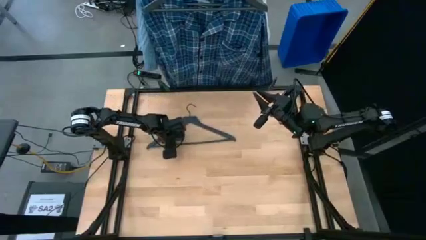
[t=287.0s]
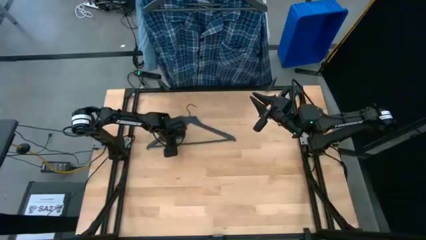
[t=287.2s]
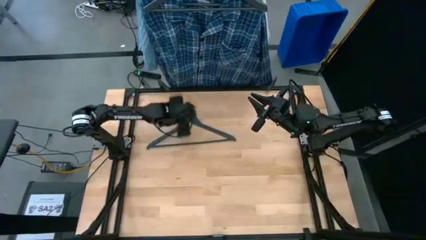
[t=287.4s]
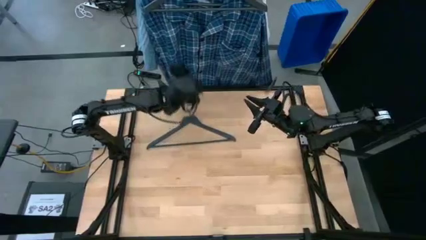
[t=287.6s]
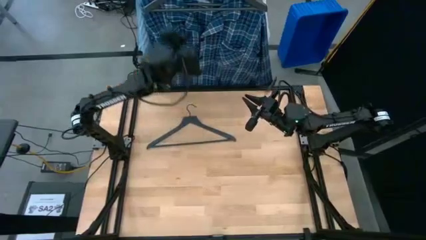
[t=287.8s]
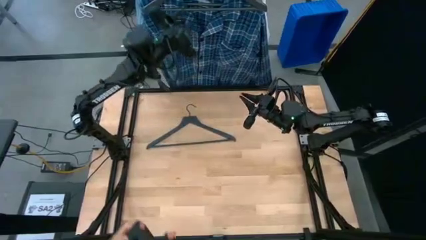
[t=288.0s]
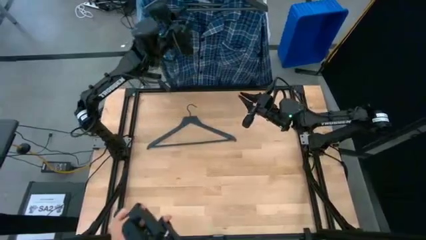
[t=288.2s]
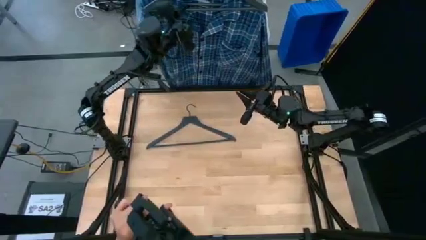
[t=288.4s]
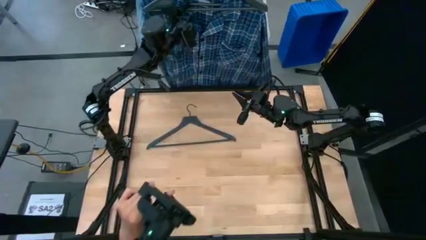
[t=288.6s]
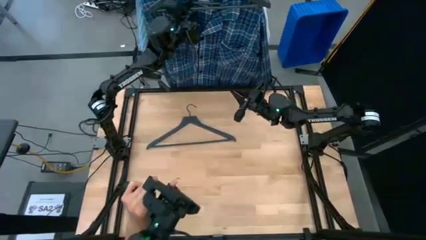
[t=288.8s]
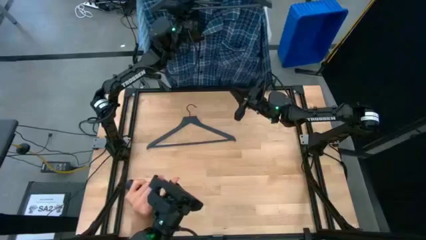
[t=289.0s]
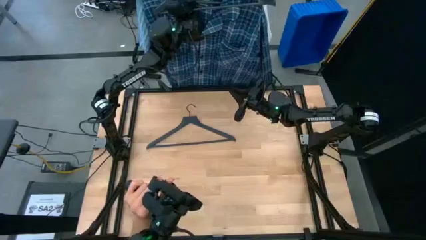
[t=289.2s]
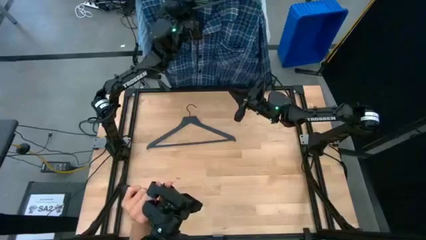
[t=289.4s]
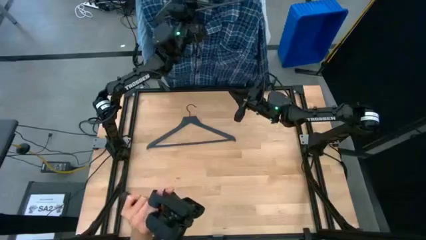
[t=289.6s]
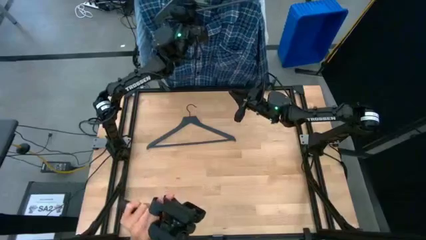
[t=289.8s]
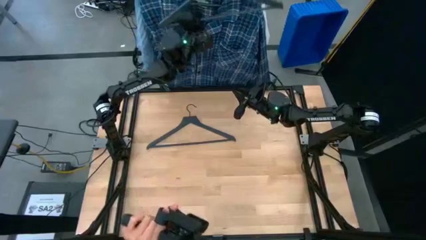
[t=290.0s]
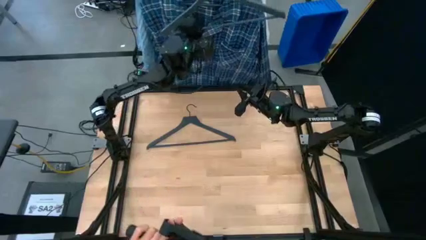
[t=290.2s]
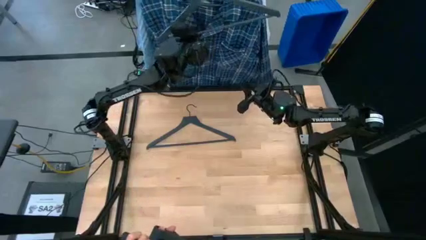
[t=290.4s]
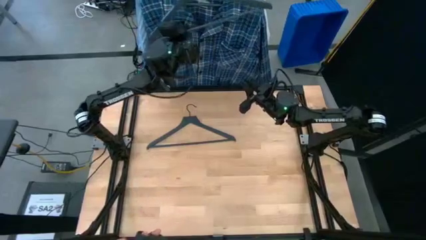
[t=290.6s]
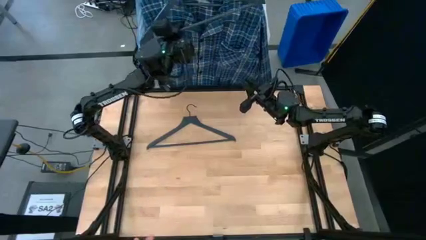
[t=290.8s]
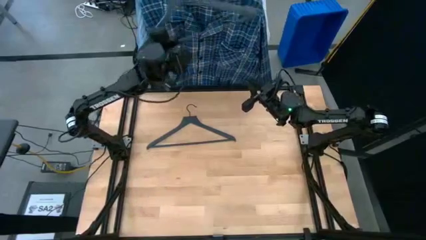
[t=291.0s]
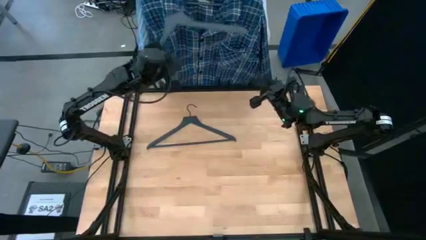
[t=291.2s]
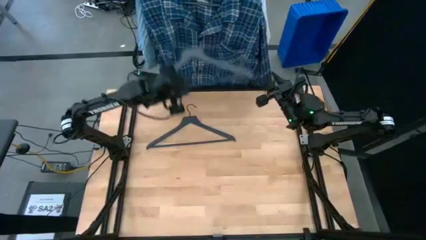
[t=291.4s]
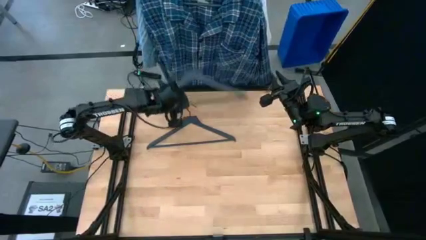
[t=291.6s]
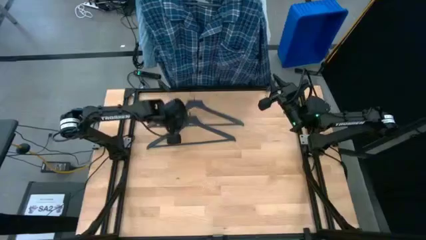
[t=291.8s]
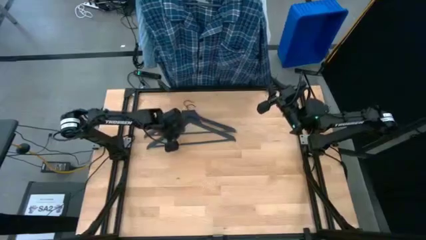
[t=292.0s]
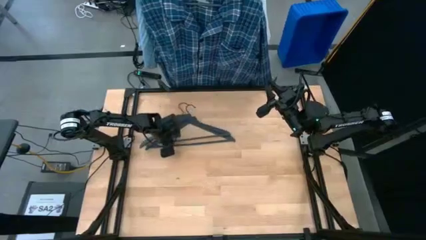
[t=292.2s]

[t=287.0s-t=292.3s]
Task: Hang clothes
Unhang the black hanger from the hanging rack

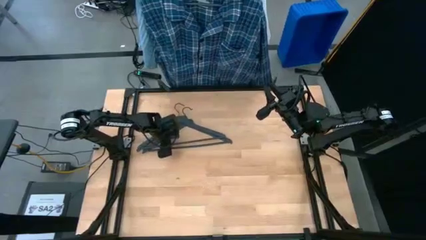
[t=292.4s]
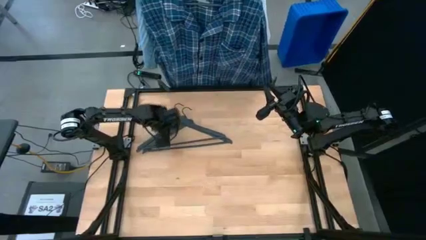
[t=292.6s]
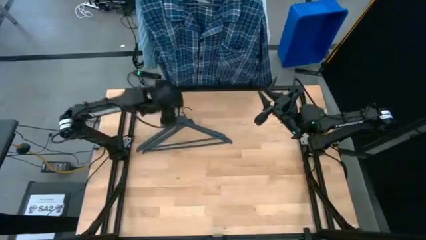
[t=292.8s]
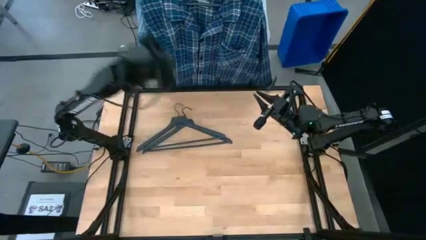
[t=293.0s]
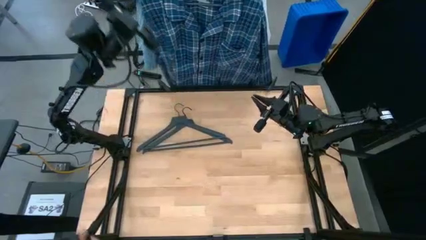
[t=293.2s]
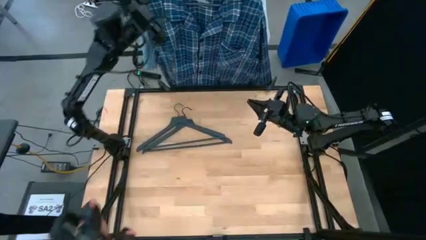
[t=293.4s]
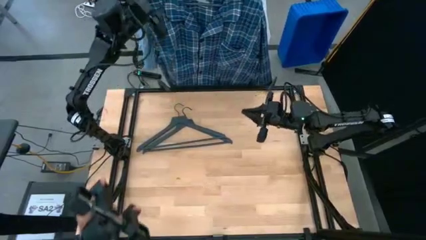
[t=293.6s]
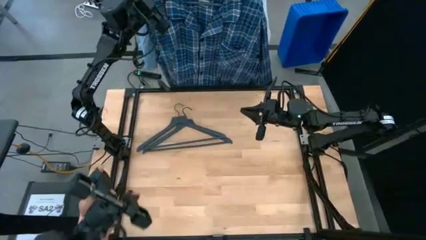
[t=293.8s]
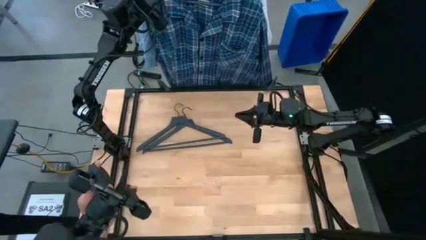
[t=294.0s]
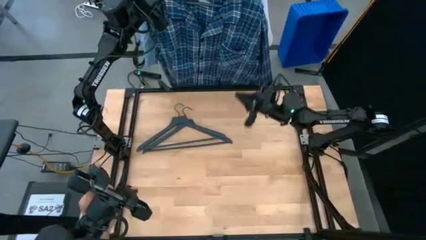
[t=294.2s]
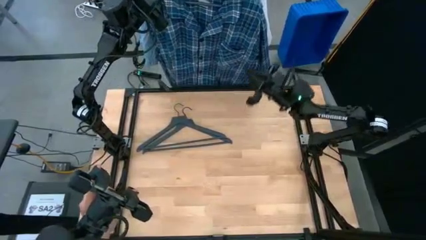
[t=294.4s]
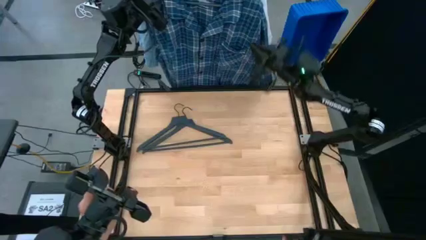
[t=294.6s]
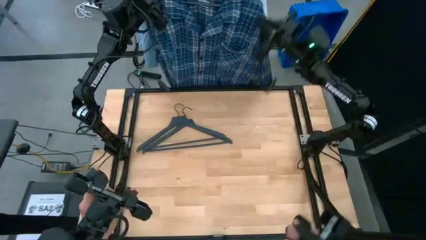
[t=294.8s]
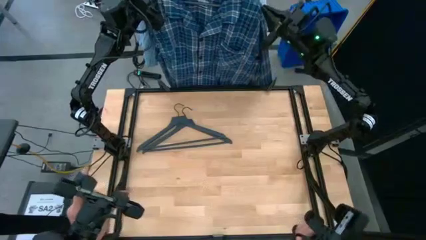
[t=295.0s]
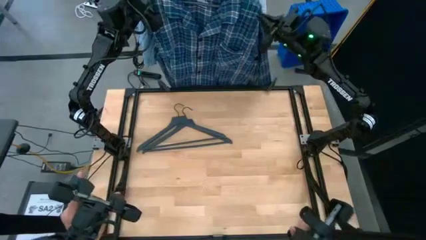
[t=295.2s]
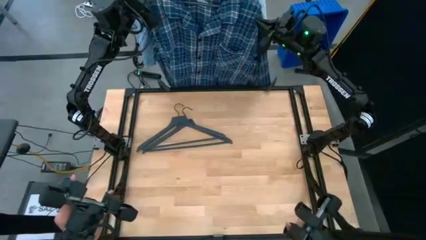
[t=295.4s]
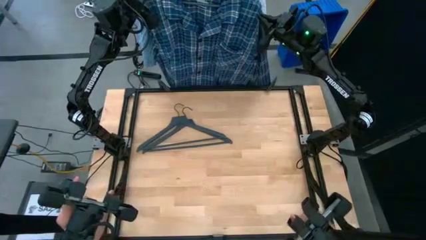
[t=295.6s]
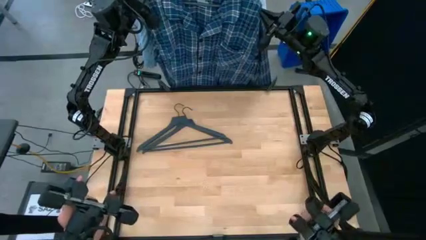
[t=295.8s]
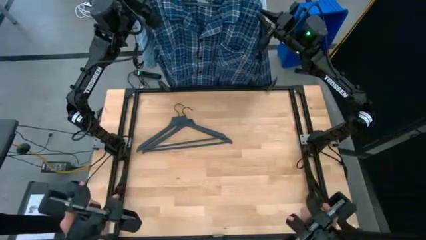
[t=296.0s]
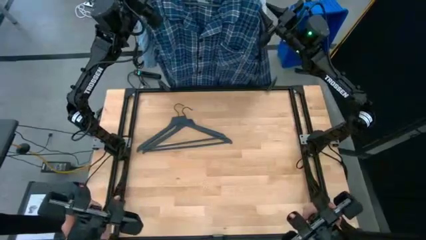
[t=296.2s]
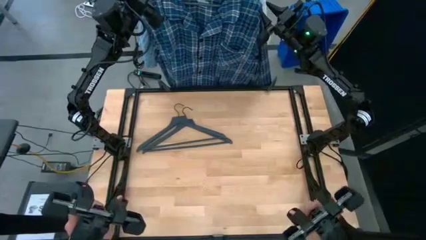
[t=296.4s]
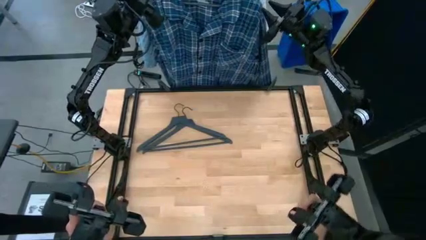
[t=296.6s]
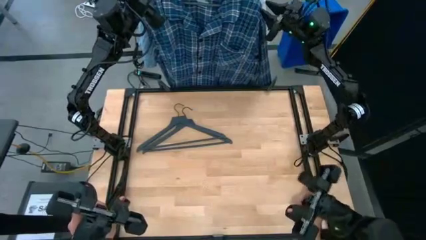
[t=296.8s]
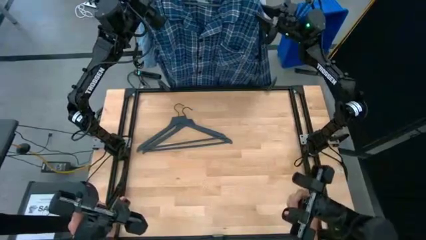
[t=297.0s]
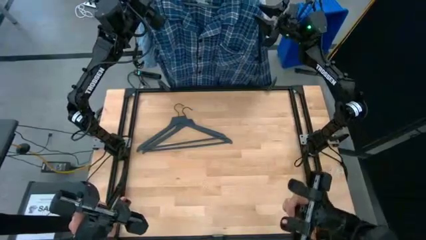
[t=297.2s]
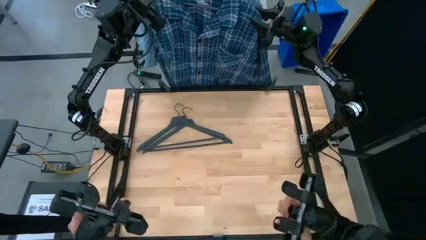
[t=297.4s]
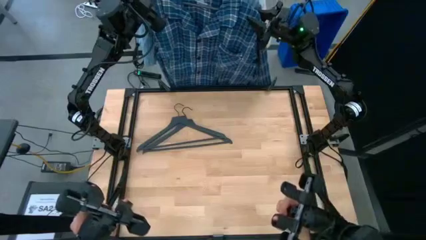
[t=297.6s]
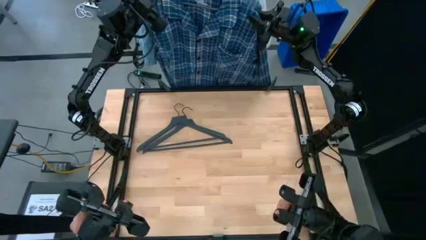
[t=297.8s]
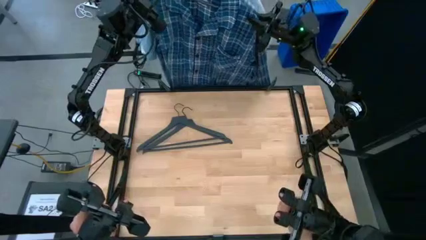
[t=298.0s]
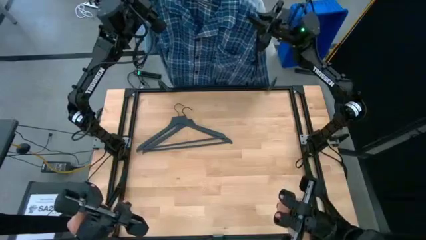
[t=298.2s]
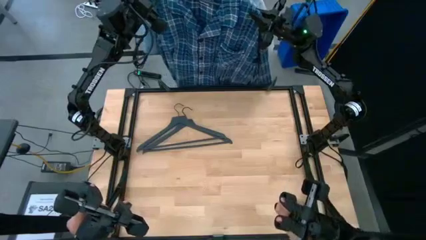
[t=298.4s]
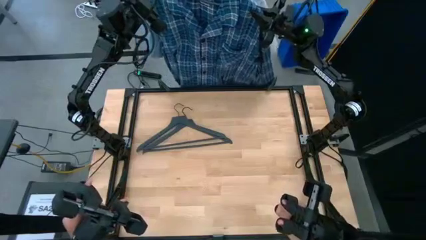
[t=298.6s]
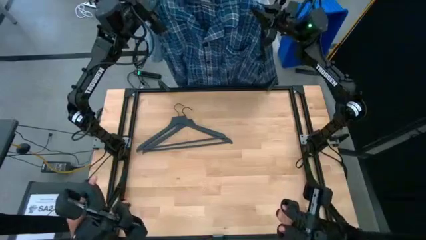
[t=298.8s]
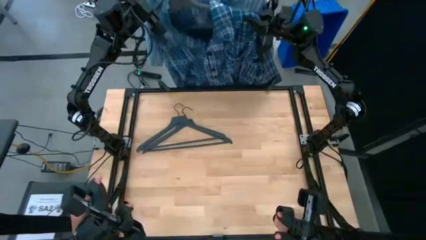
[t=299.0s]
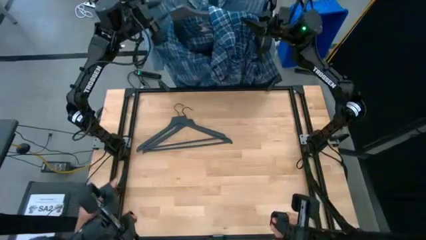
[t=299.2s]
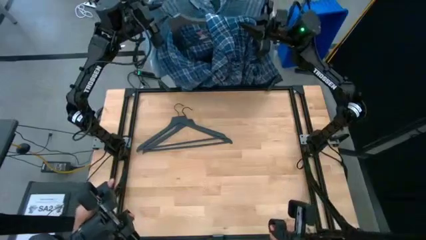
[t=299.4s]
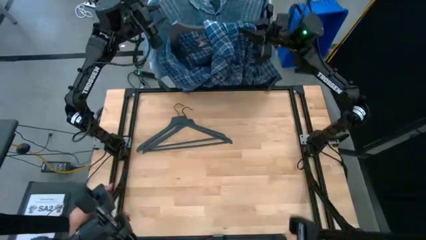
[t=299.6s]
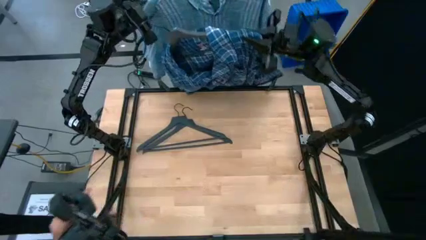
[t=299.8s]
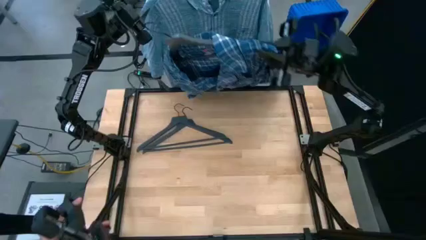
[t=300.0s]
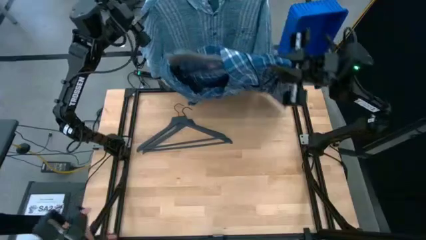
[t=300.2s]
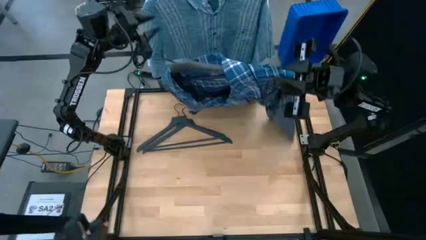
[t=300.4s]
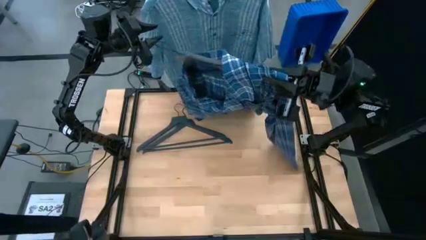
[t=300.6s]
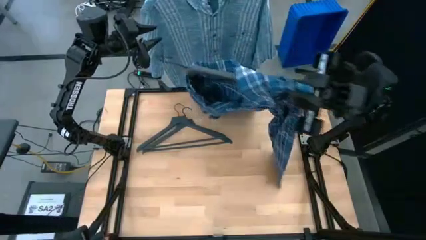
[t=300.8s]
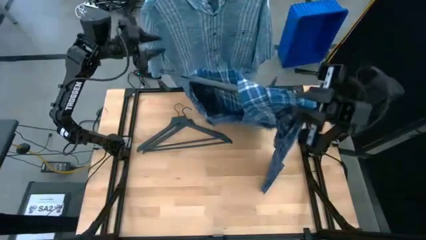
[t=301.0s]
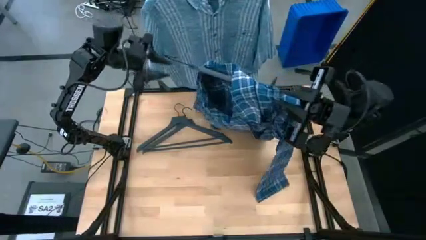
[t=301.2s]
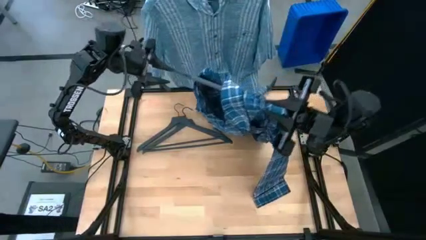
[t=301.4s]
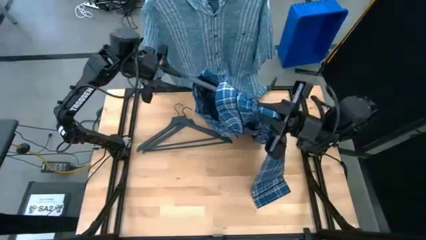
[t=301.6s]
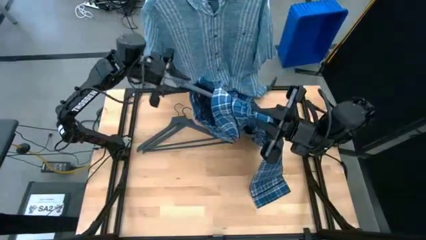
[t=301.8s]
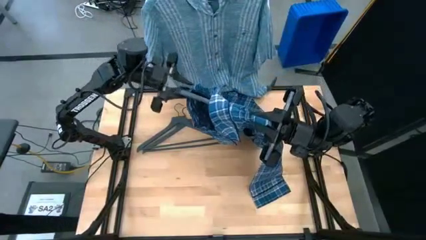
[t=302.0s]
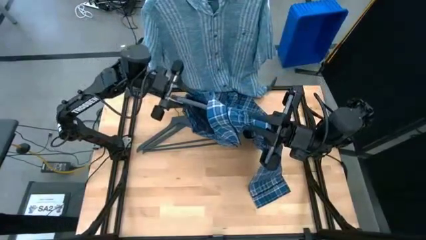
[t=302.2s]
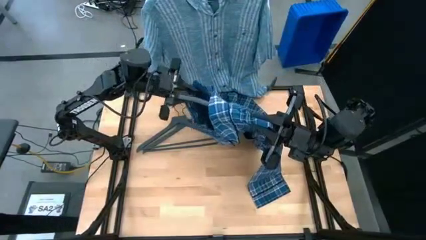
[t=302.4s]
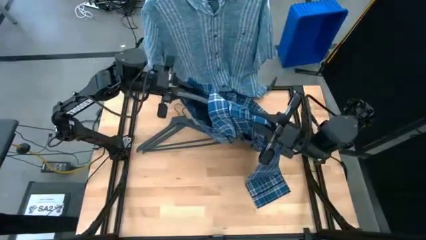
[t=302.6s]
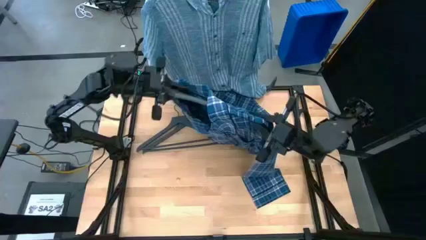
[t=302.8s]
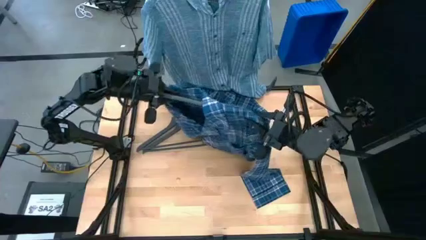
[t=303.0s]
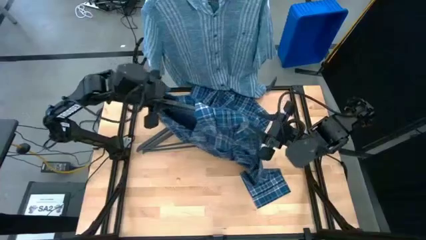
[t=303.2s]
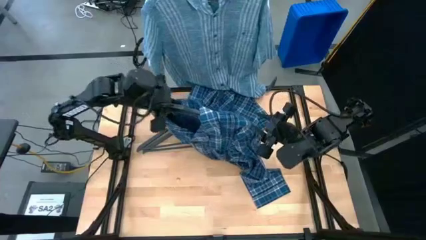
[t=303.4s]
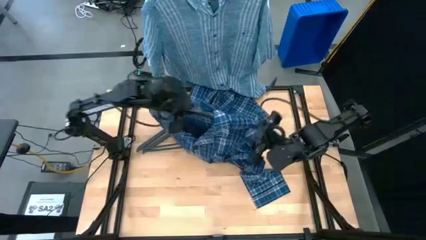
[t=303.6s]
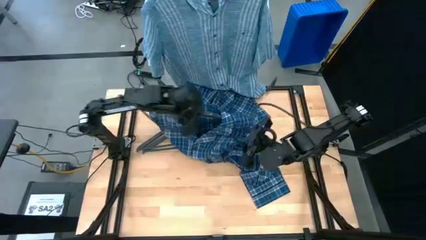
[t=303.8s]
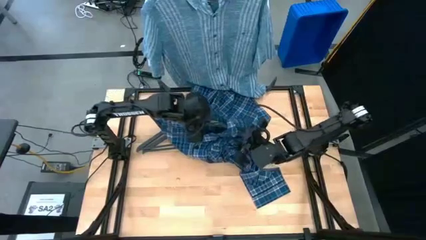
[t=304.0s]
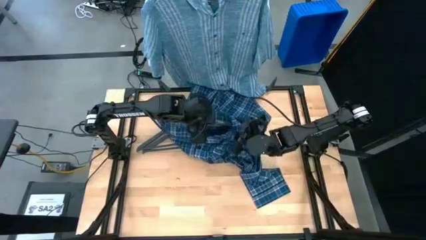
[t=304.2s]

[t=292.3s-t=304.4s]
Unhang the blue shirt from the hanging rack
